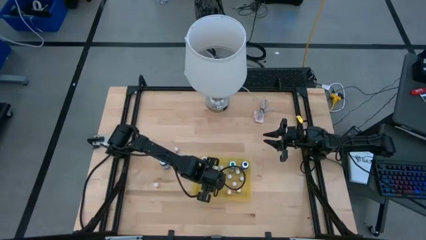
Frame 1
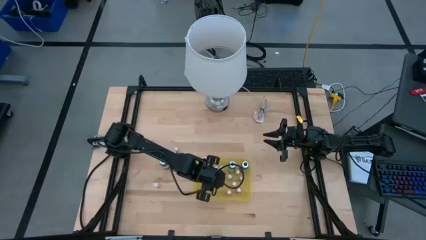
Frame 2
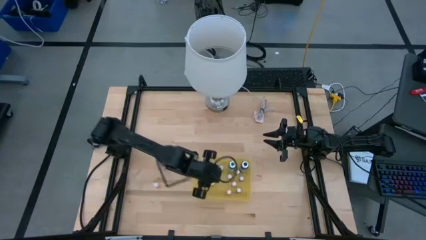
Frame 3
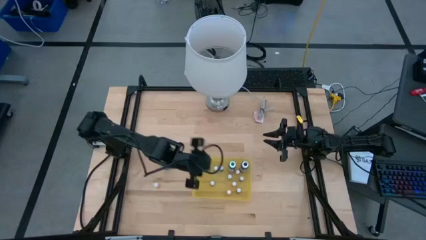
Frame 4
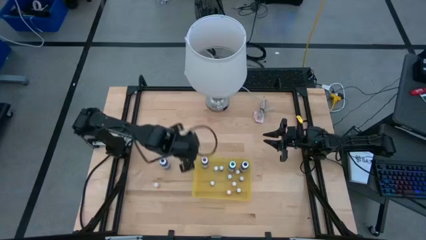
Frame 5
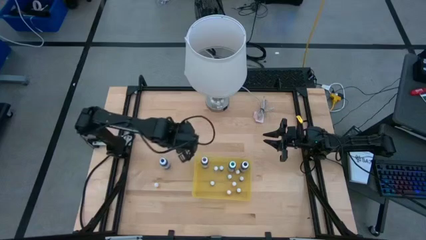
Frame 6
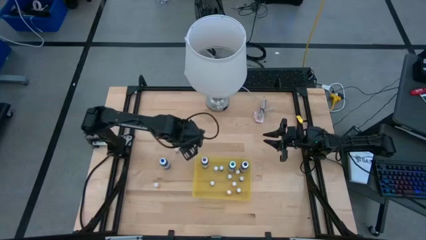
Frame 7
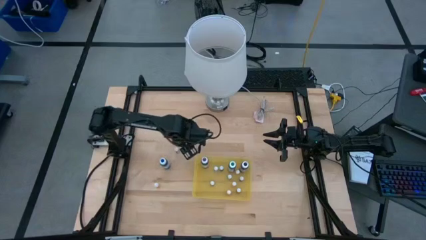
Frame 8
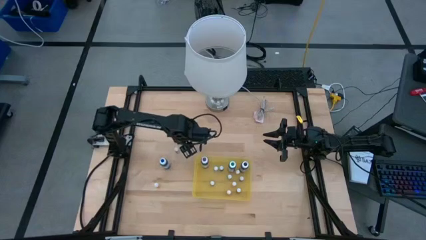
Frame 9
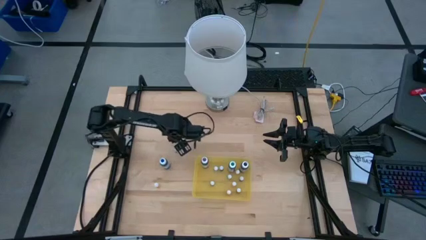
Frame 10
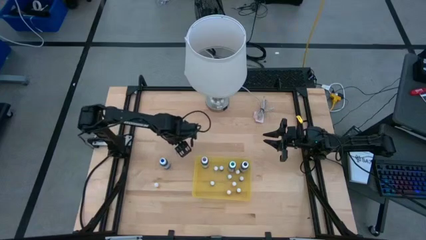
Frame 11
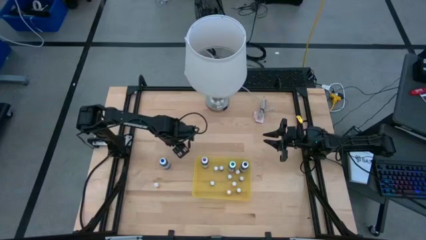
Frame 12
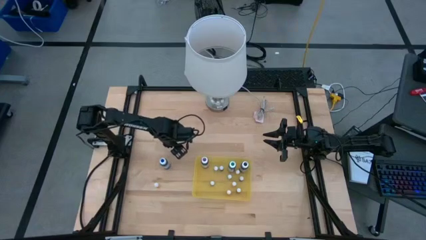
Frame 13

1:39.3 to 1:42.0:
Task: Pick & Place food coloring
Adjust the large blue food coloring bottle

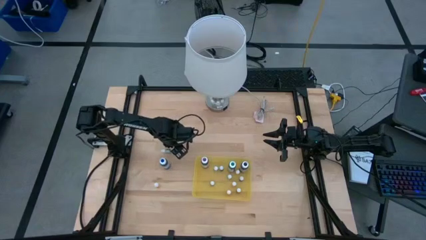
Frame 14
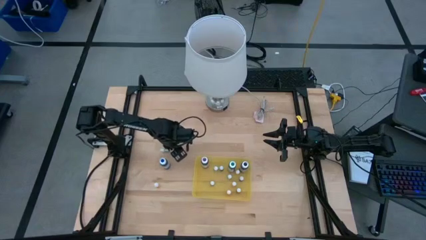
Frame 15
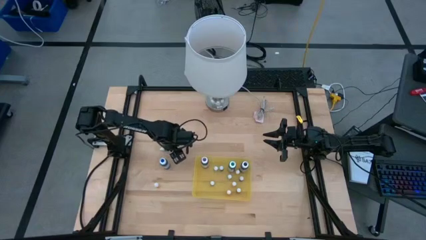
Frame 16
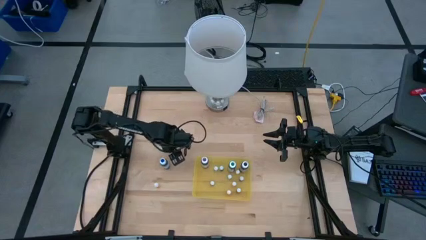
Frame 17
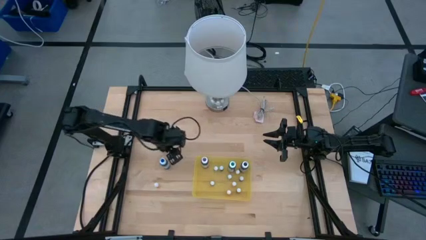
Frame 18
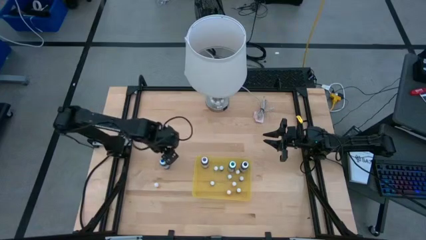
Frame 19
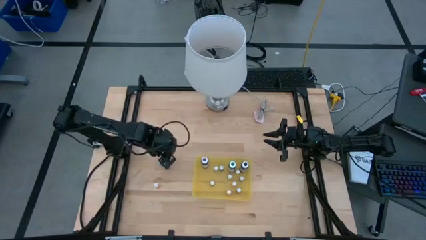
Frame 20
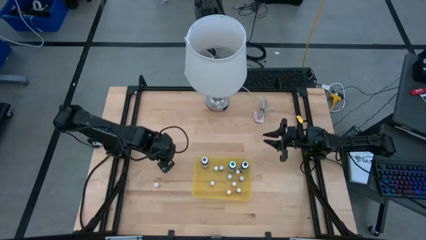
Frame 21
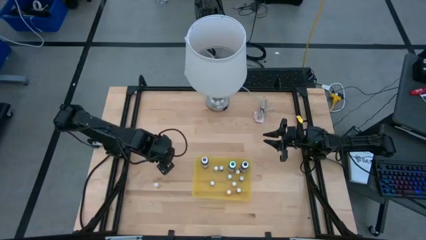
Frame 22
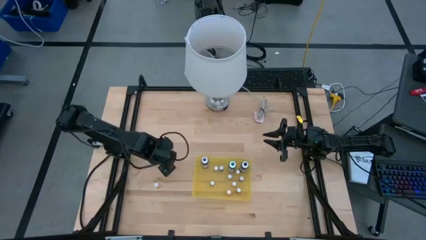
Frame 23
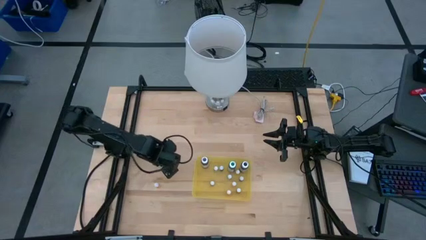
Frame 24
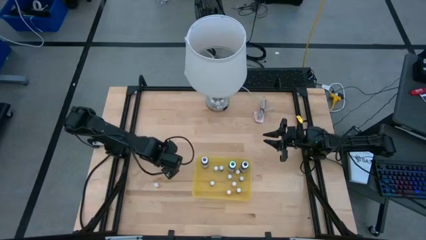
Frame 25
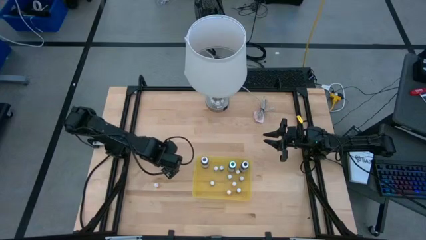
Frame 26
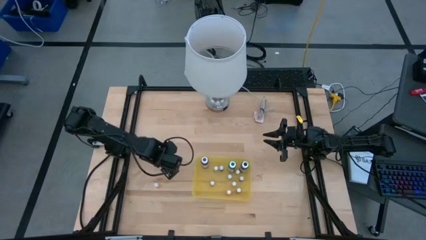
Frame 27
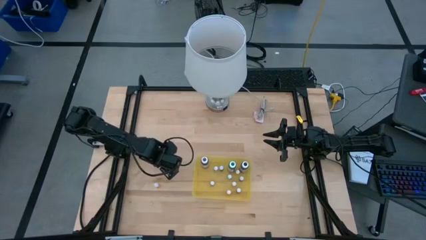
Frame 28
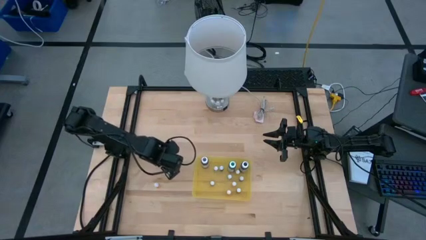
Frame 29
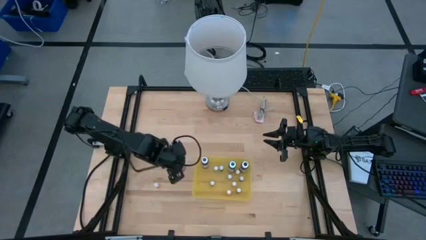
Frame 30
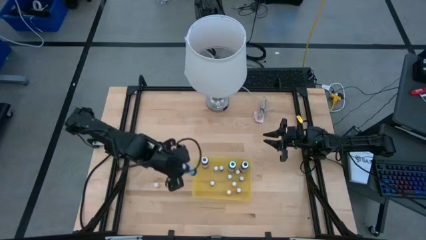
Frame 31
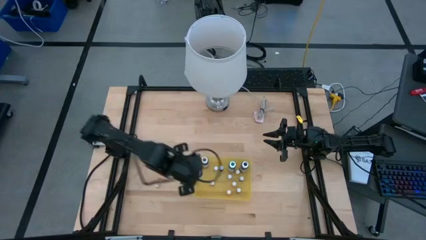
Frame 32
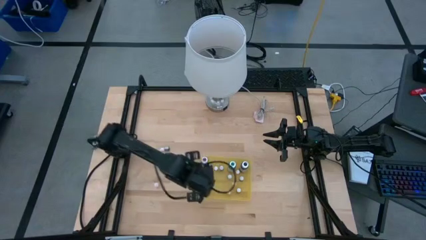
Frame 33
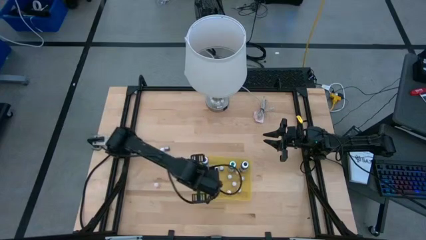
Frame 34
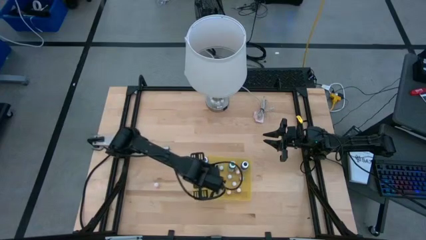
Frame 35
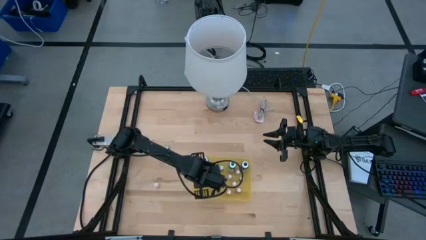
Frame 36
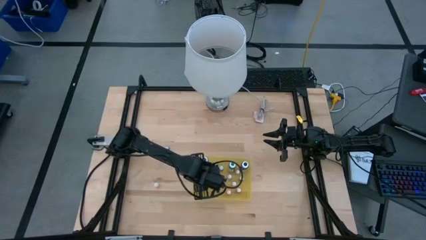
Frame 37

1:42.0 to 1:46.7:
Put the large blue food coloring bottle into the transparent bin

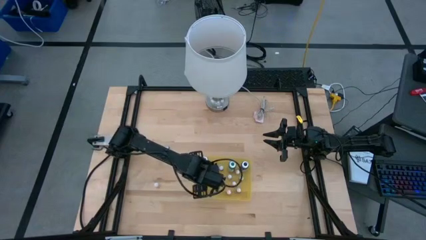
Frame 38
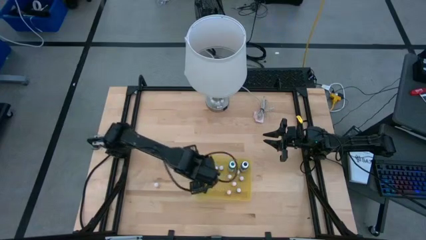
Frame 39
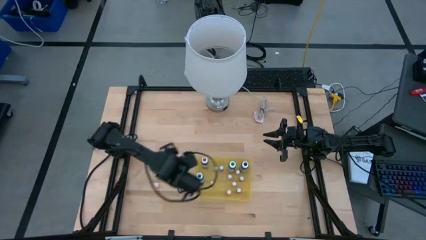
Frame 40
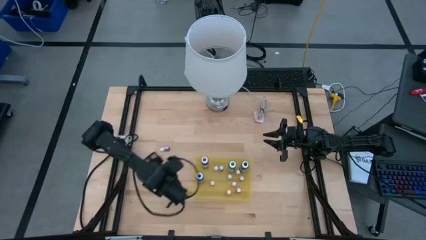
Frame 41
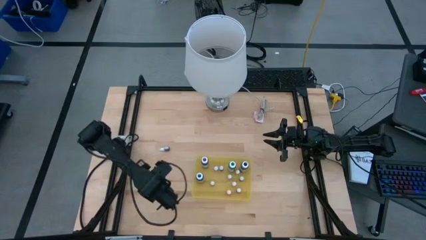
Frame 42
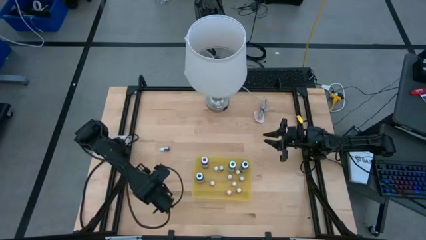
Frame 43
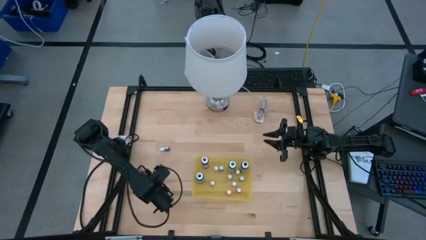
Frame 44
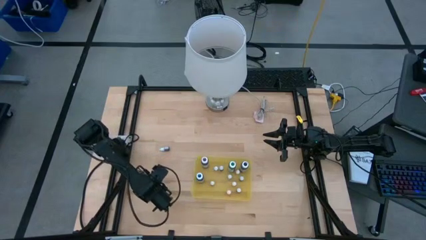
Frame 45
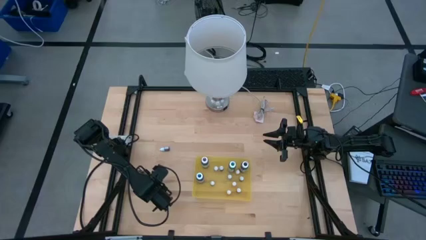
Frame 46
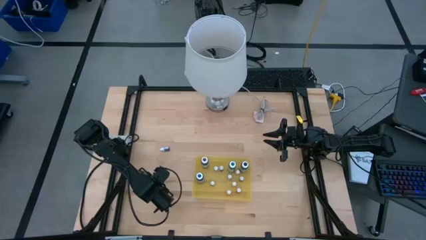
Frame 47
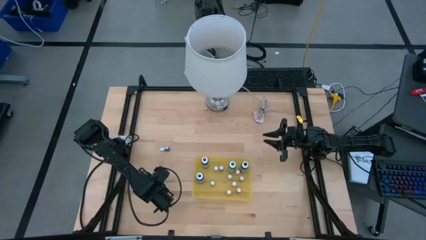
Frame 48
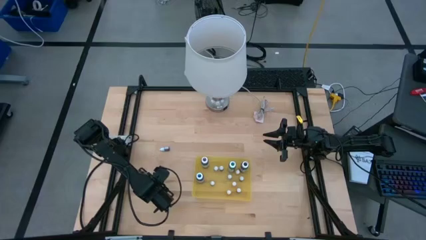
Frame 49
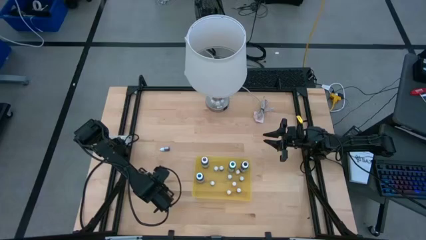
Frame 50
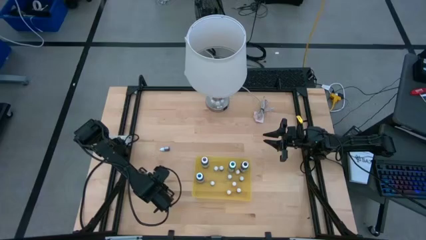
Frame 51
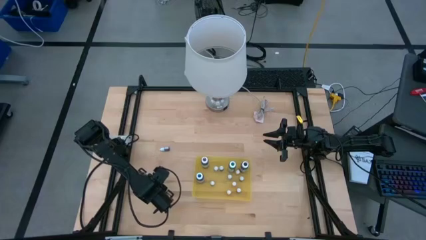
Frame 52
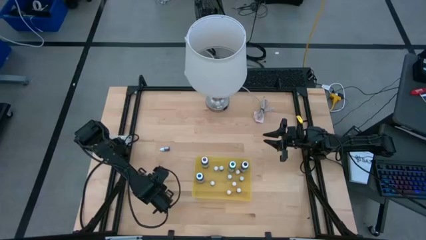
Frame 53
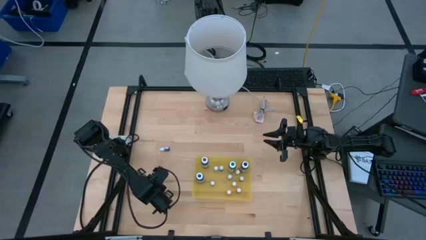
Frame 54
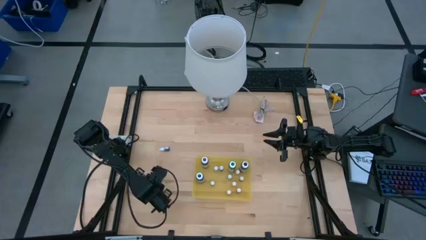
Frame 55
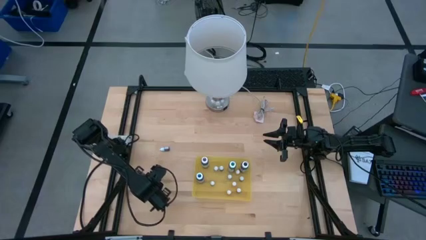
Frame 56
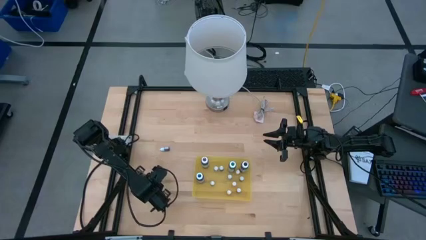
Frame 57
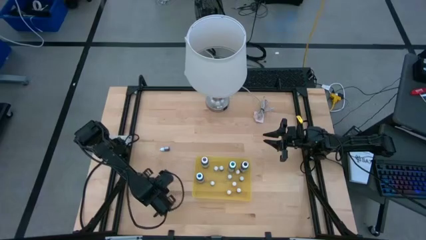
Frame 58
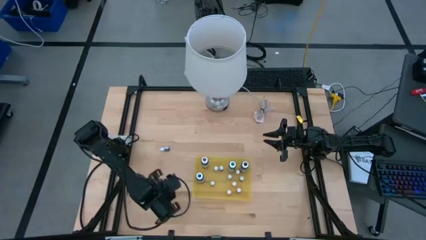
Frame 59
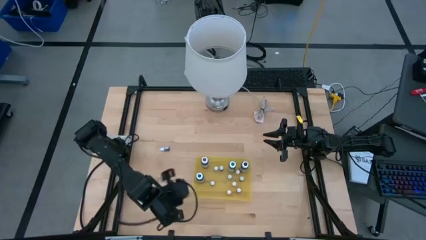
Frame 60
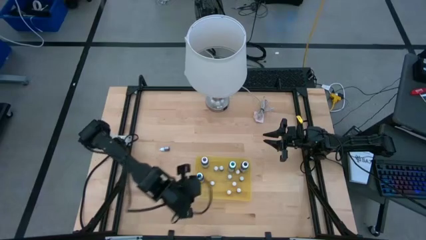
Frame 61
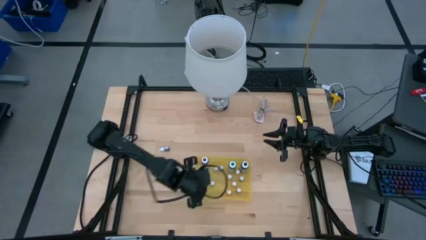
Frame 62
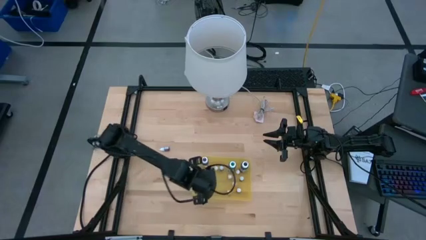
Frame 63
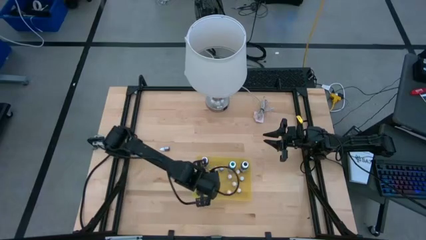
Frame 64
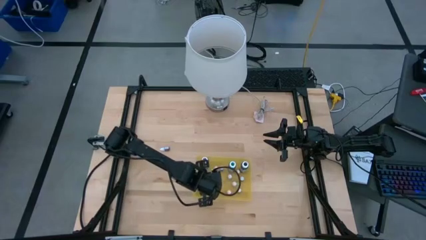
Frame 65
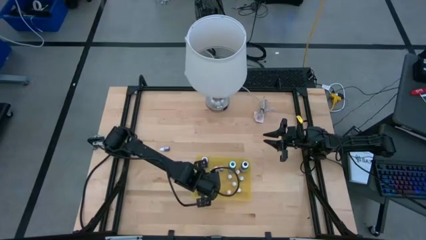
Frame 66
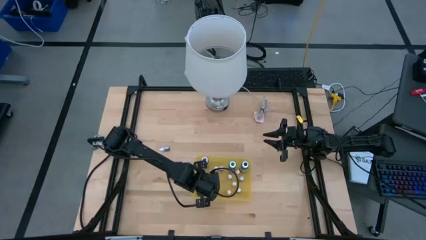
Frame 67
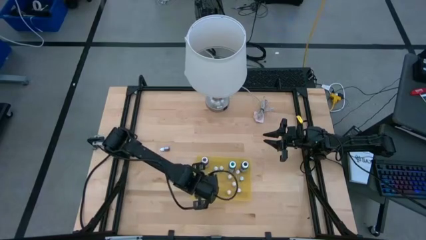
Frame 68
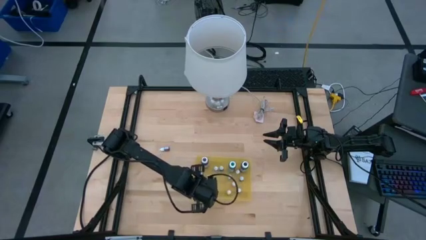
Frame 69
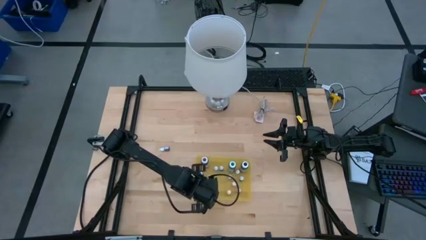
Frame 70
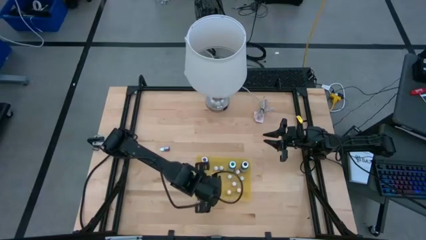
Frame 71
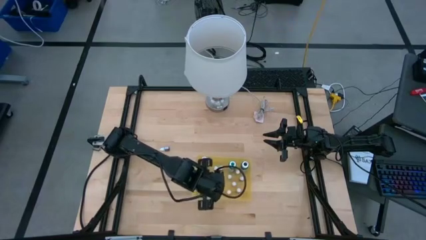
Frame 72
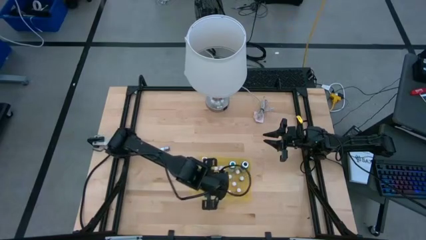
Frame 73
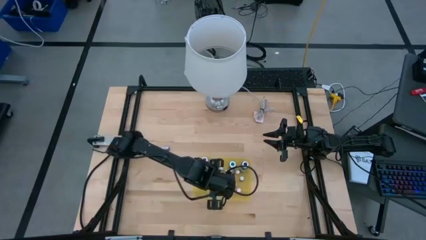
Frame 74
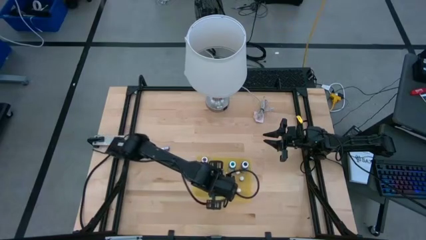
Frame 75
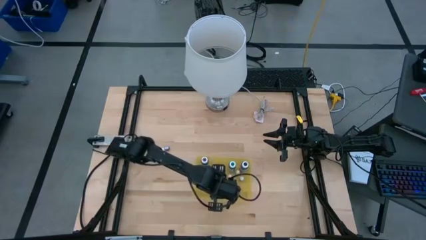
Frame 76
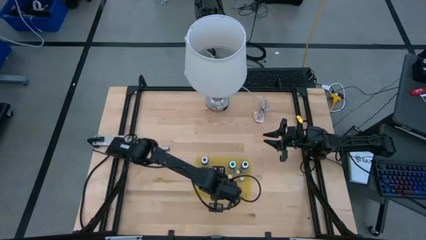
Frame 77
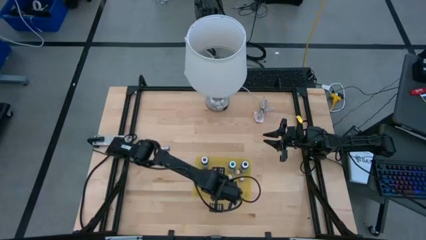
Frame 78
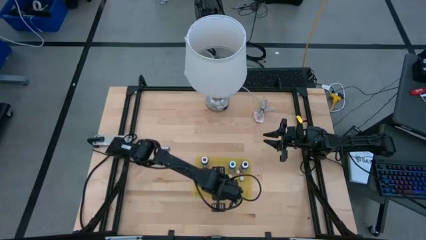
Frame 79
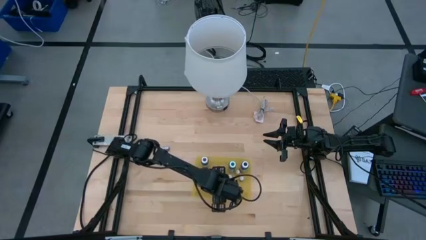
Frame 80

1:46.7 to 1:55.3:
Put the small orange food coloring bottle into the transparent bin
